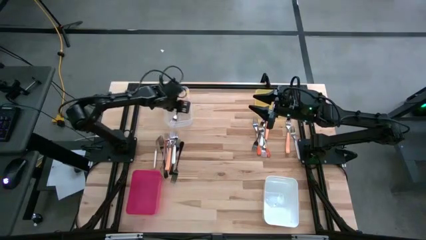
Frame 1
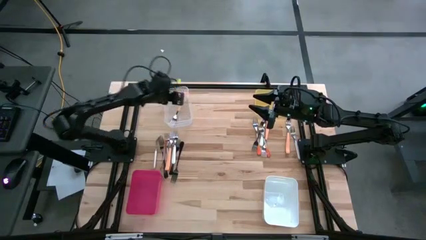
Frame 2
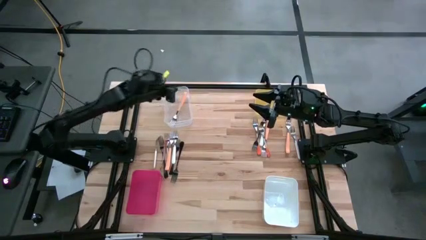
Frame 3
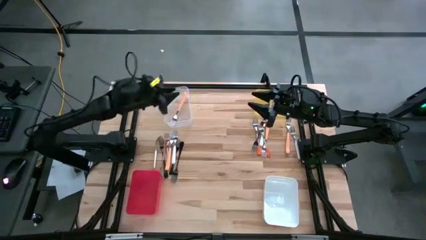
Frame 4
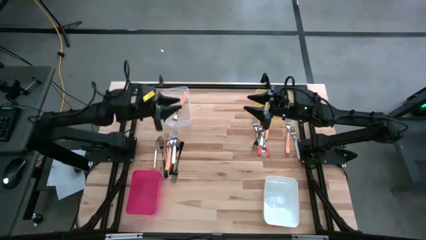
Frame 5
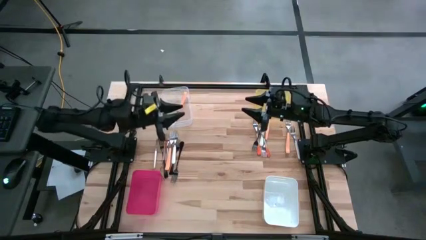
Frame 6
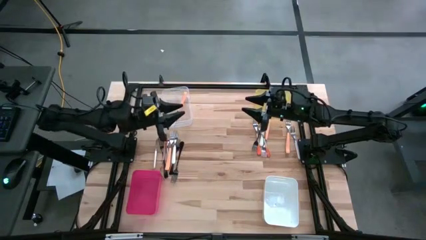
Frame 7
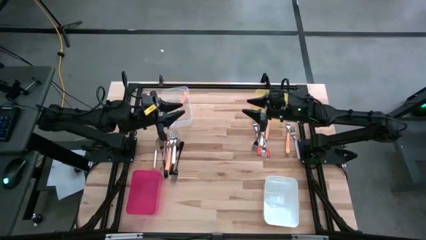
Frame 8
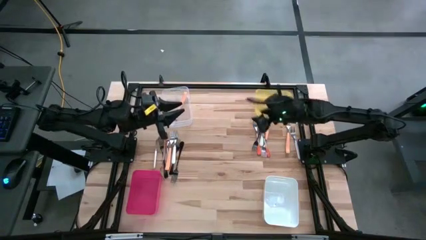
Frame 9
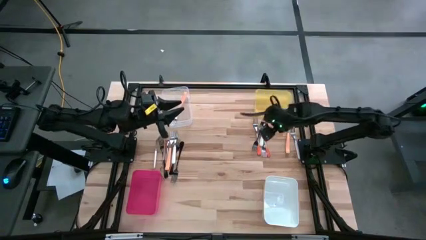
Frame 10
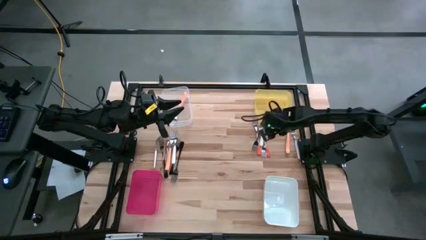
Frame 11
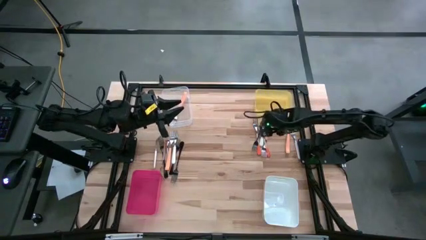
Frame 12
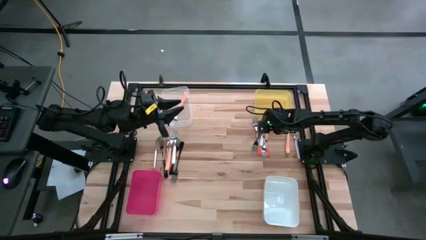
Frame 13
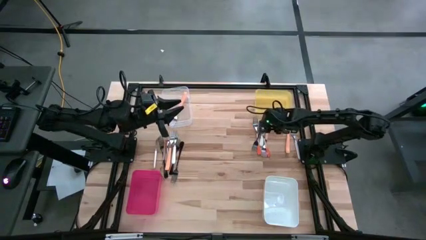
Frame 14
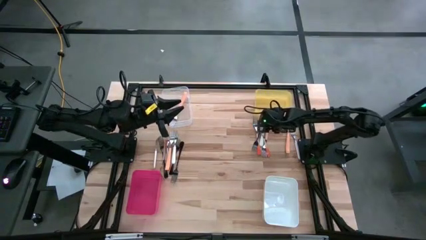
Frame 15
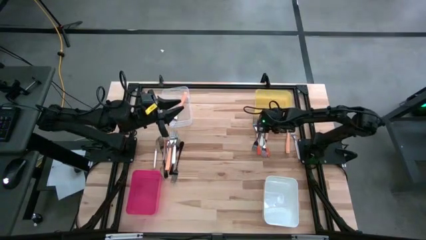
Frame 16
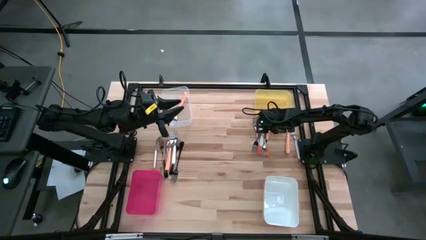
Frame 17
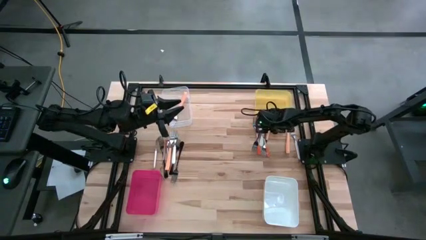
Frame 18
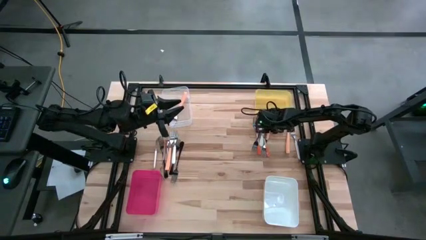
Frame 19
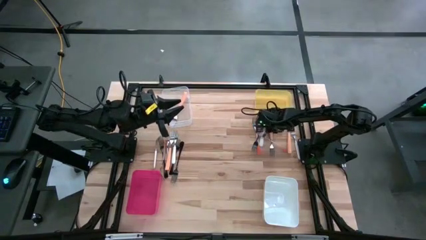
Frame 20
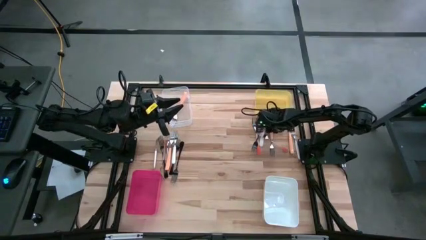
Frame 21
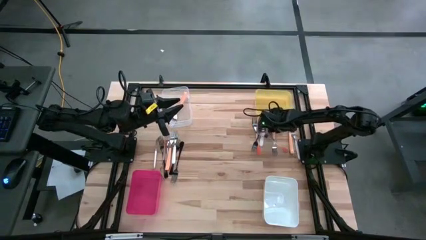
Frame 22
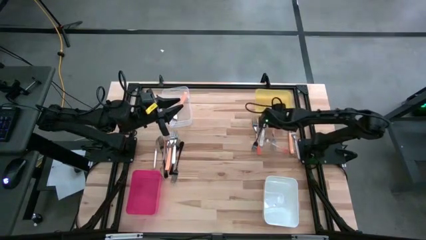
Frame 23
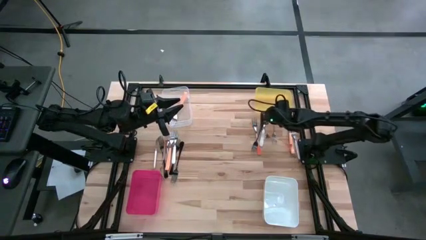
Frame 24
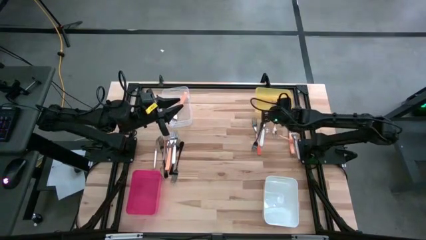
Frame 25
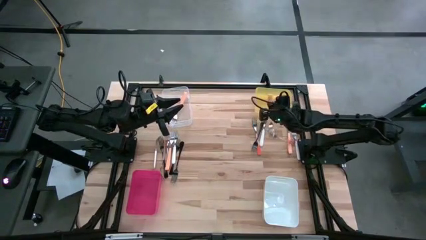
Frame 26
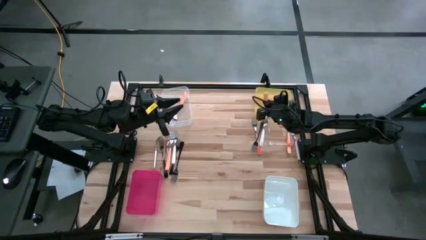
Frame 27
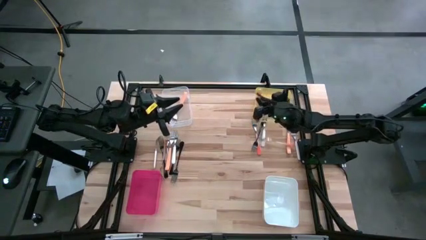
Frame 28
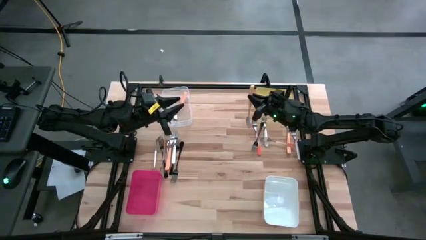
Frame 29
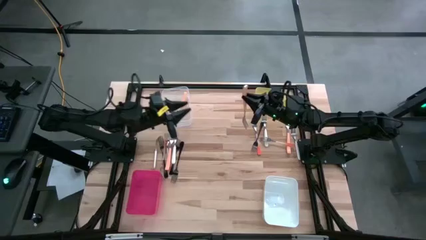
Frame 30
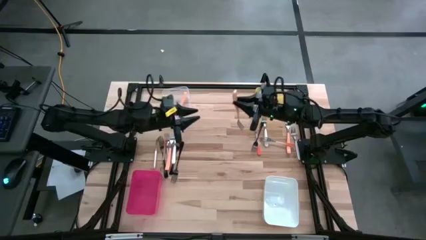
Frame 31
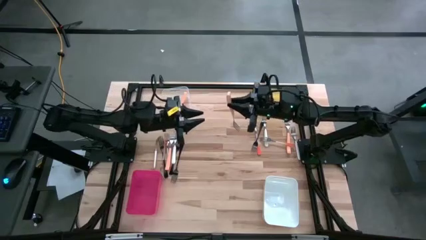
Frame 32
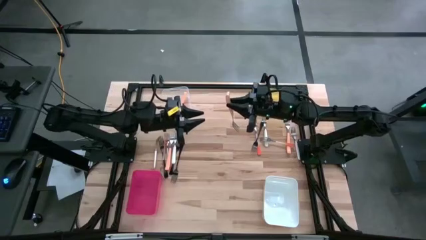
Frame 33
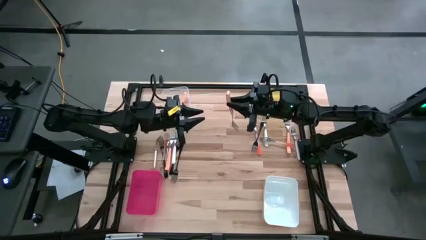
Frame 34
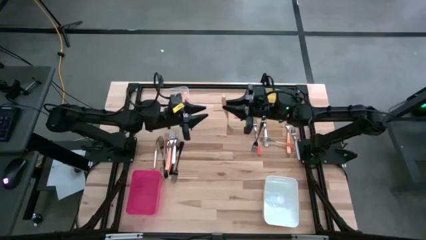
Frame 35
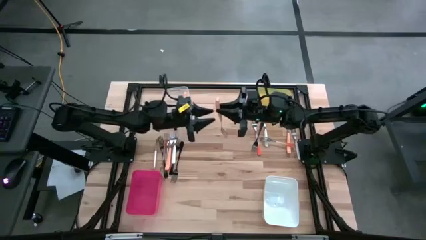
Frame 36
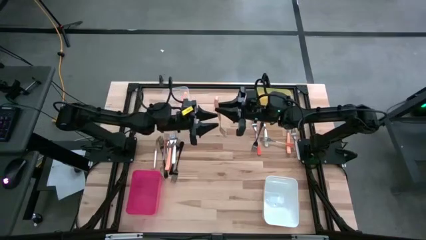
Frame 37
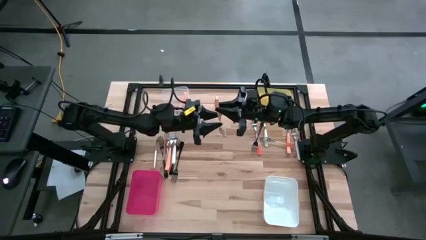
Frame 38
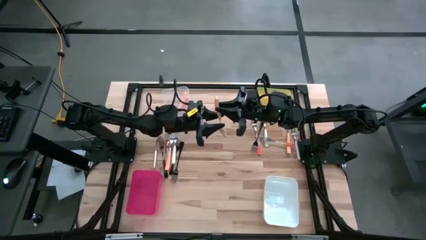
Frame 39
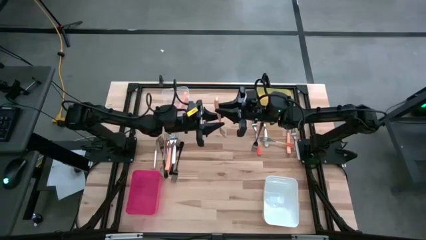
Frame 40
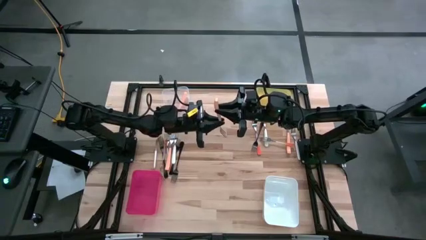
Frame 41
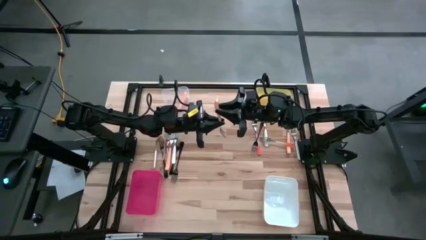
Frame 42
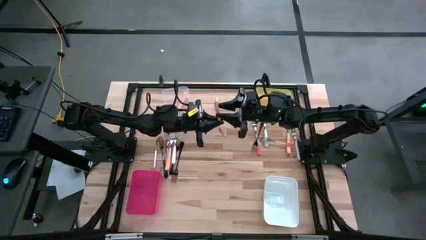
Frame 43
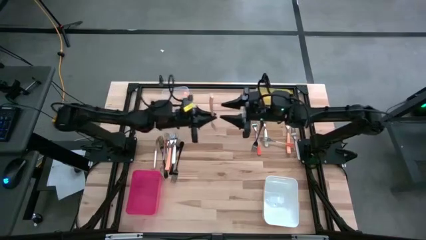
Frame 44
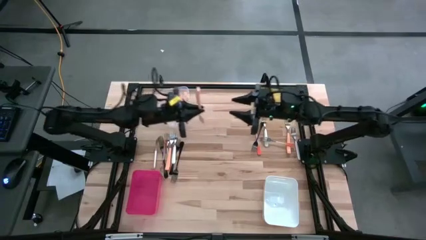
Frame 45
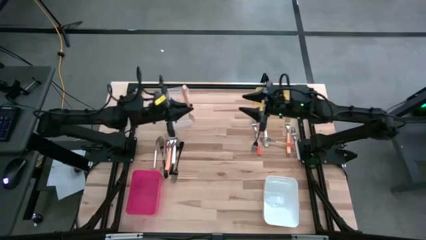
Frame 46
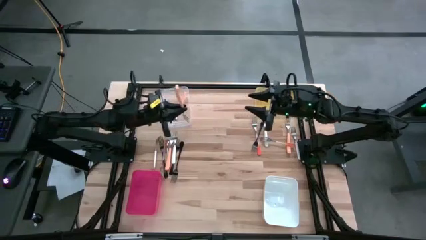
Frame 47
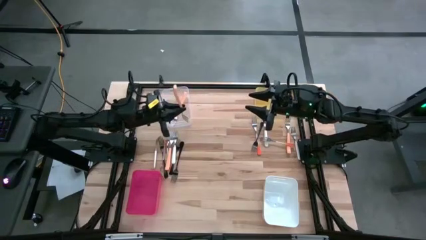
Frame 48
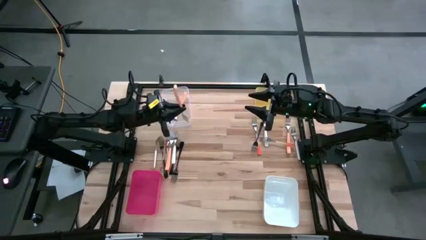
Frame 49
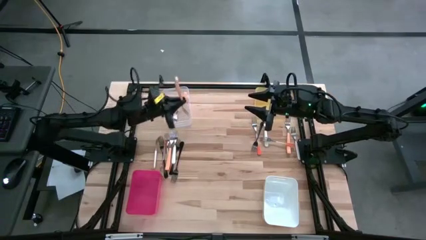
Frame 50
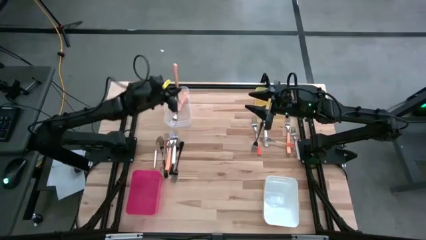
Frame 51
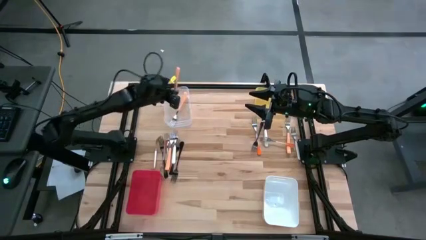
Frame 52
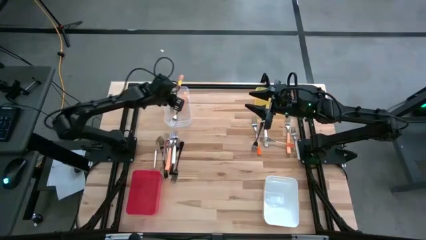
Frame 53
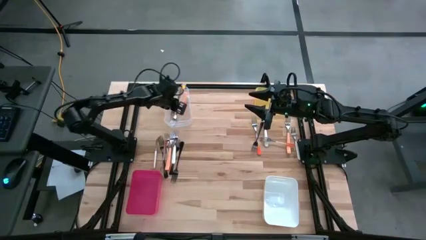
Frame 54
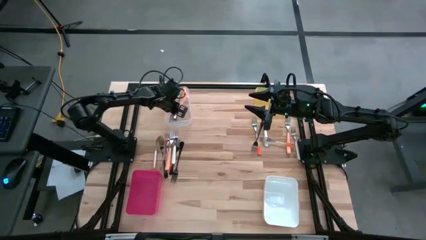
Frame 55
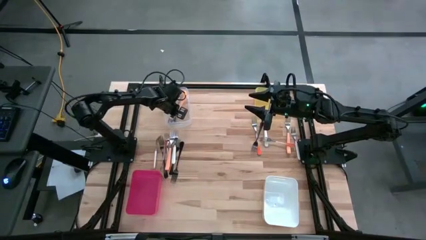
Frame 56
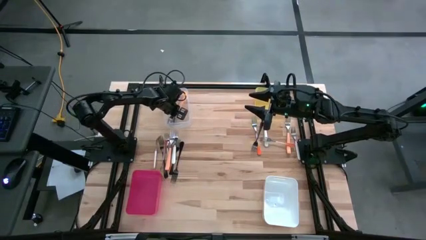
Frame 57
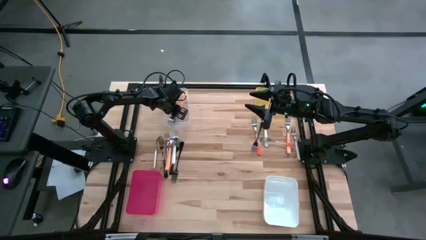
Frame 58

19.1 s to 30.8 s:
Task: Sort silverware by color (type)
Put the orange fork into the transparent bin
